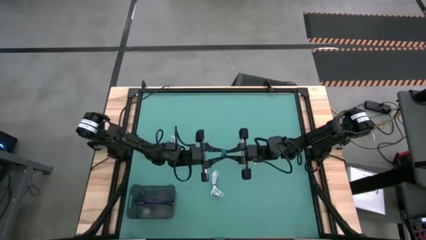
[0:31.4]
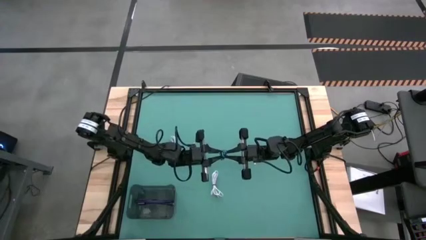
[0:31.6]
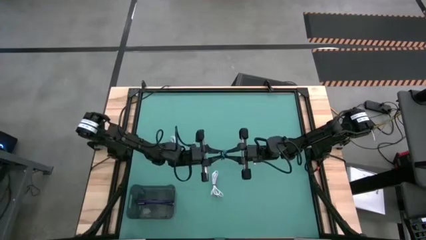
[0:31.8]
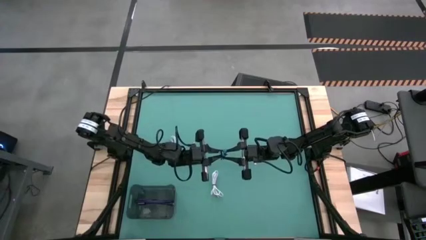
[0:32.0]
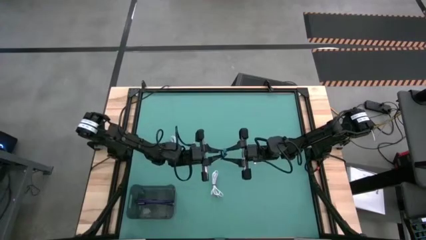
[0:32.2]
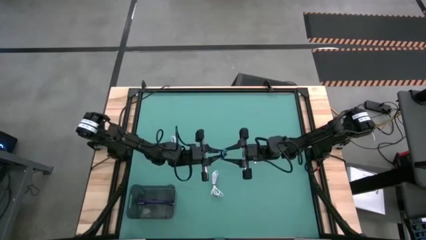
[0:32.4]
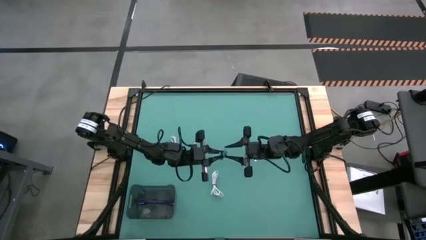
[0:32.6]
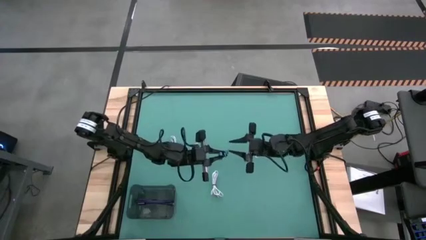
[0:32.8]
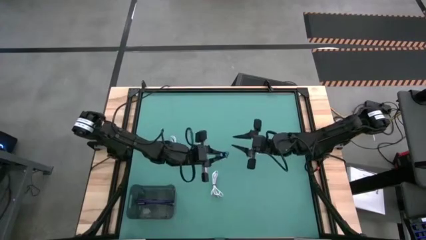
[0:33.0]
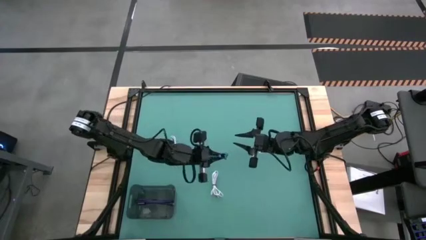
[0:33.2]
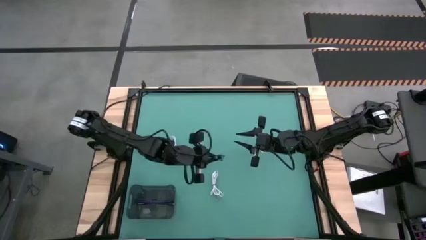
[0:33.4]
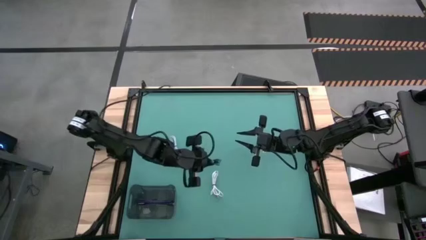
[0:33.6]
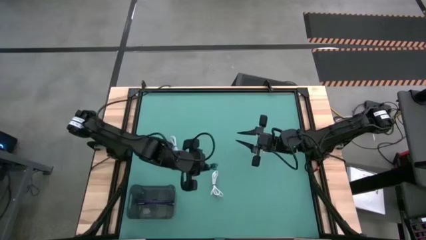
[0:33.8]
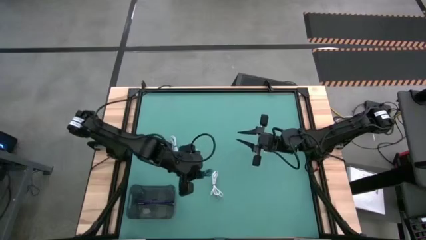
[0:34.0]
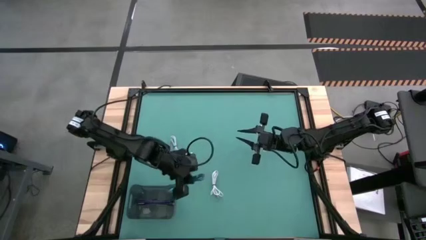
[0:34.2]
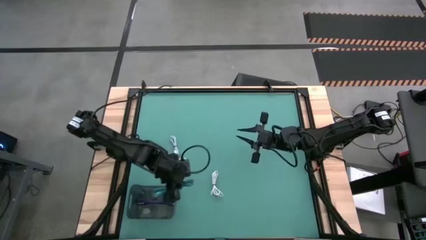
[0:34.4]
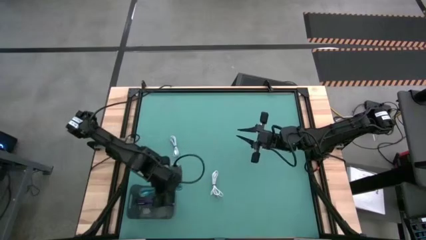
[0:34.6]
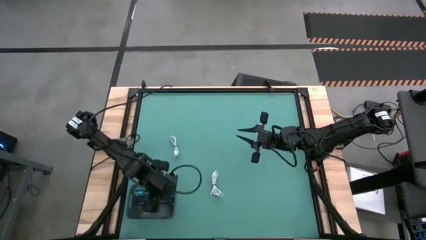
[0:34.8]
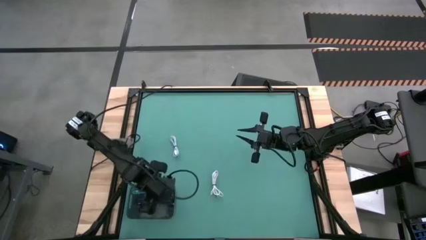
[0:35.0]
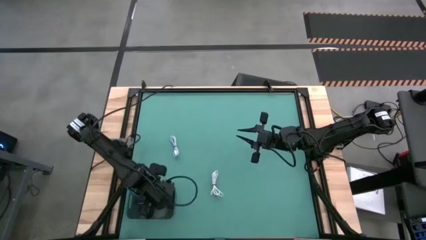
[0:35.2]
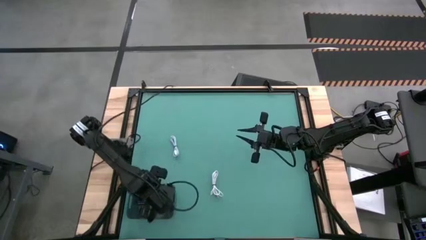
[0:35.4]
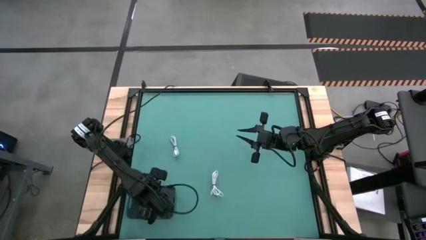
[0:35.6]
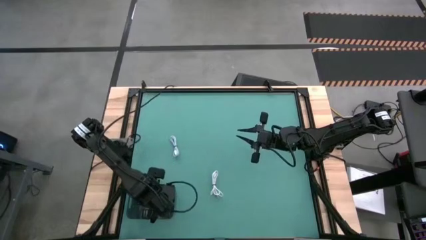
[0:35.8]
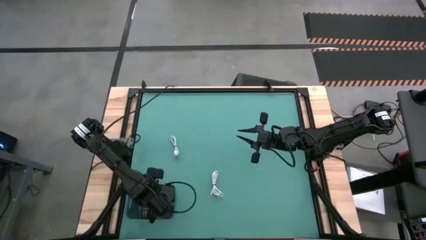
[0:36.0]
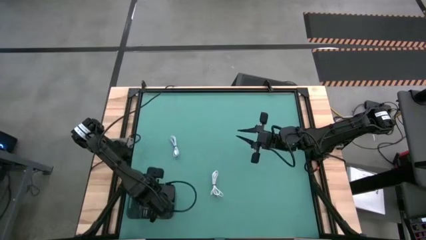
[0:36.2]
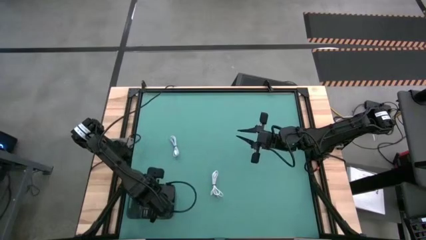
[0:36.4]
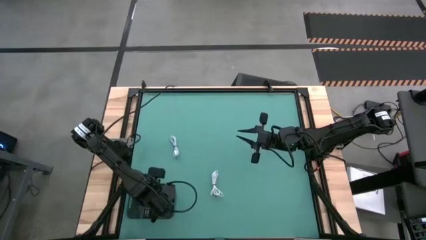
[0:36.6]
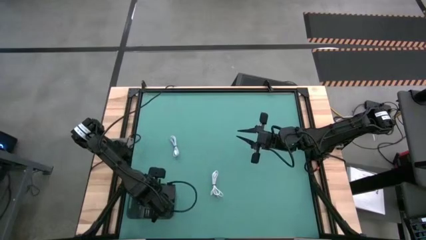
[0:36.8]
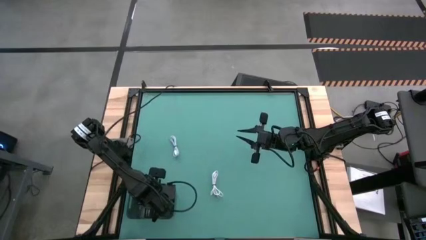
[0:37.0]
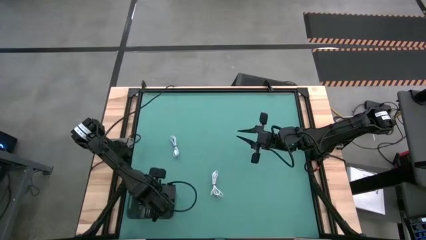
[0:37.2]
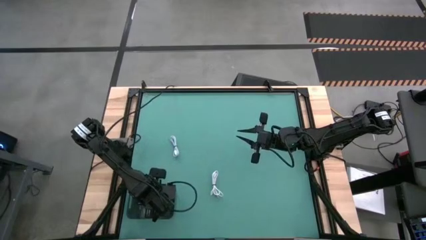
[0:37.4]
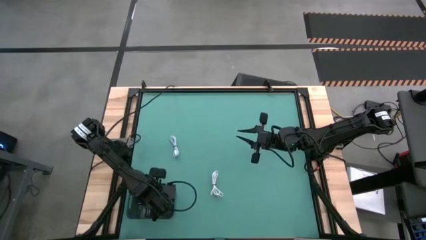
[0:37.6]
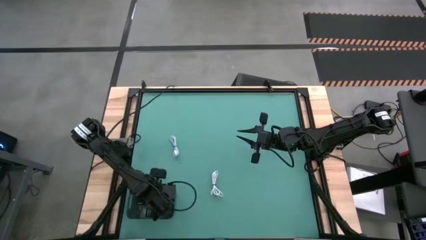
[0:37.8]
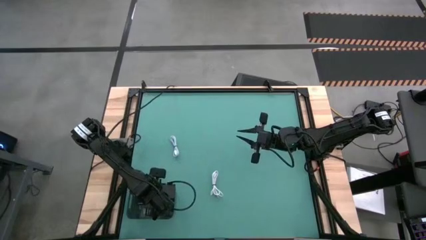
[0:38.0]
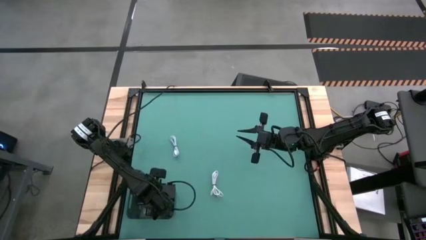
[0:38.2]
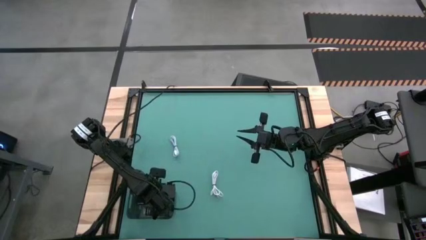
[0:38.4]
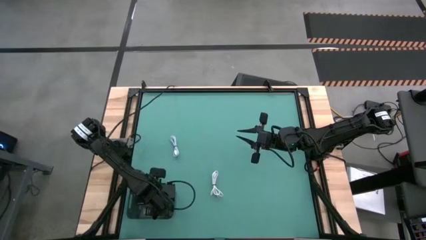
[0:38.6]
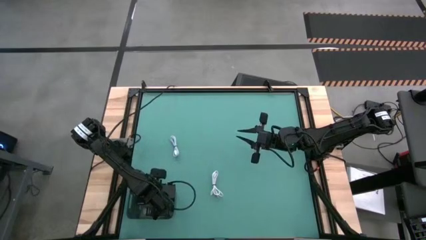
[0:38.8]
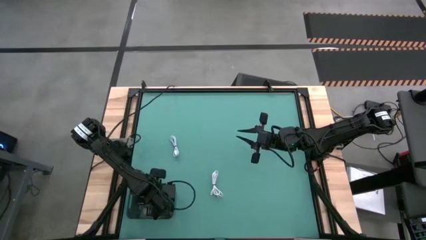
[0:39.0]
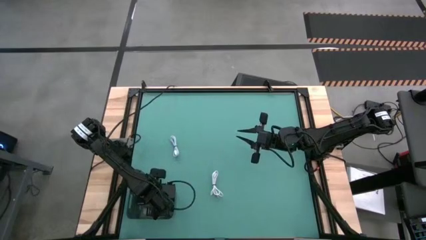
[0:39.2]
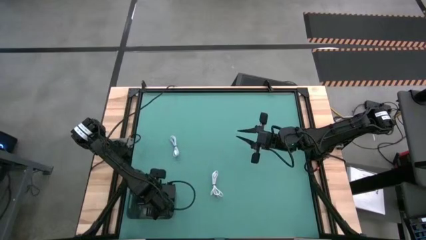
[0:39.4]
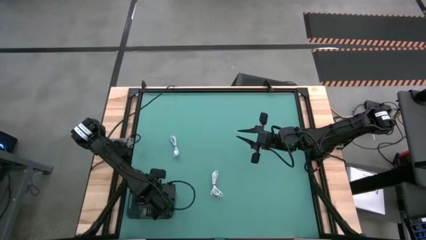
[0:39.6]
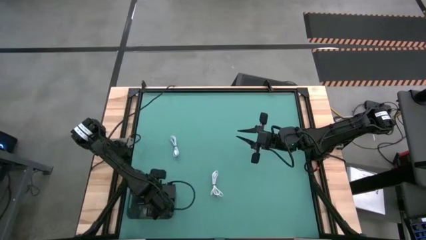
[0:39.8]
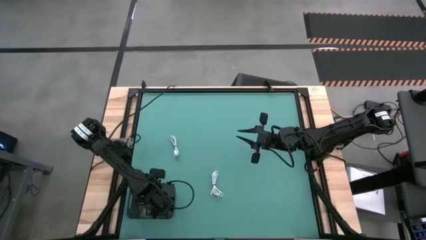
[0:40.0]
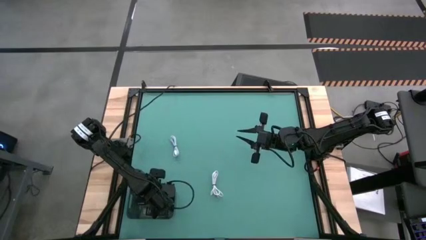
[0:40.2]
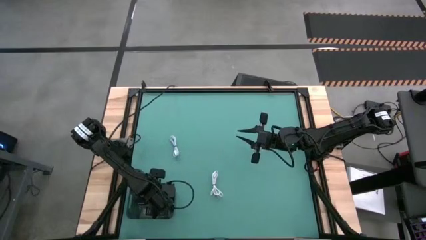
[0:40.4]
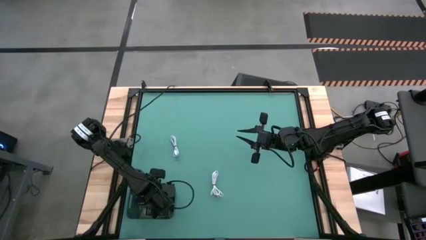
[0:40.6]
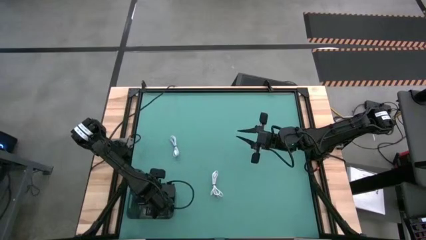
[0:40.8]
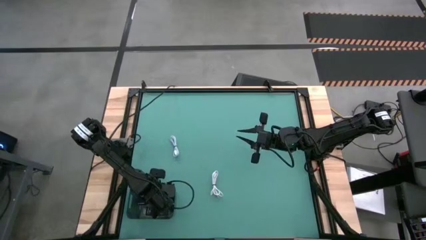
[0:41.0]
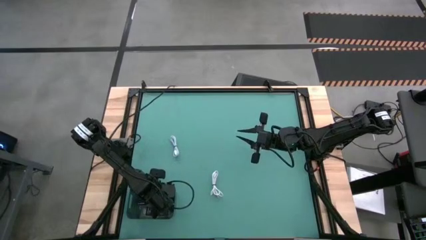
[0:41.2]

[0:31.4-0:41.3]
Task: Pick and place USB-C Cables
Put the blue black charger cable into the black bin
